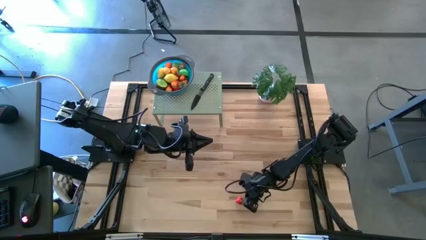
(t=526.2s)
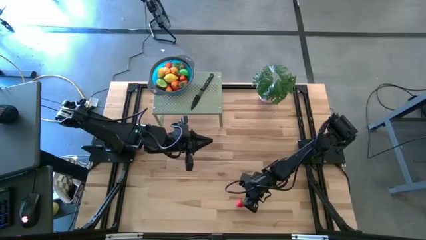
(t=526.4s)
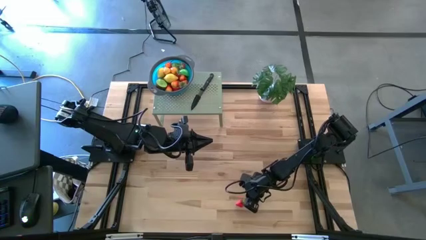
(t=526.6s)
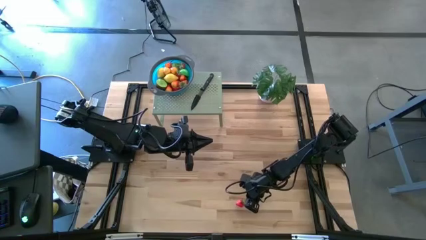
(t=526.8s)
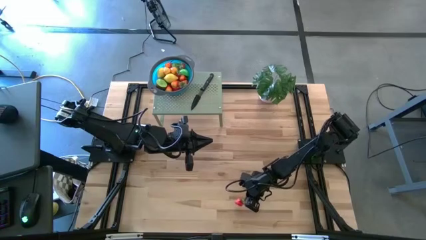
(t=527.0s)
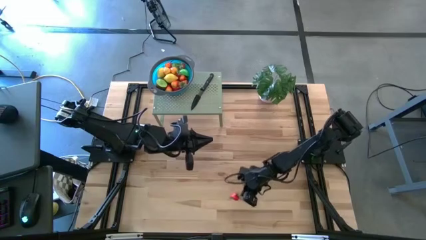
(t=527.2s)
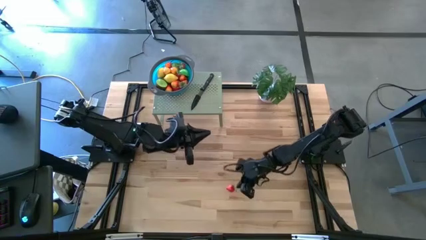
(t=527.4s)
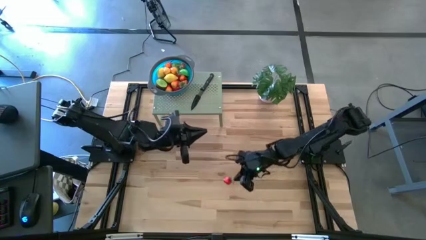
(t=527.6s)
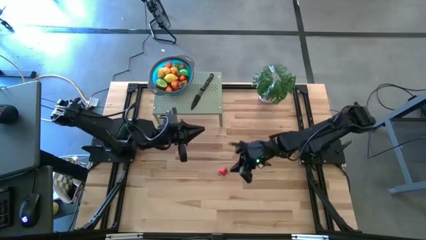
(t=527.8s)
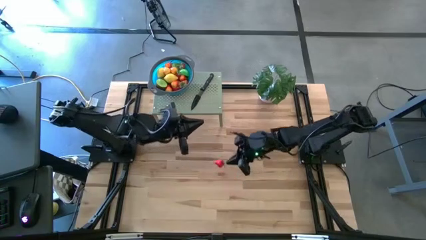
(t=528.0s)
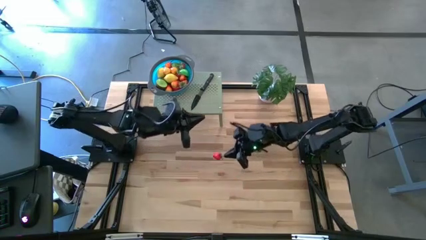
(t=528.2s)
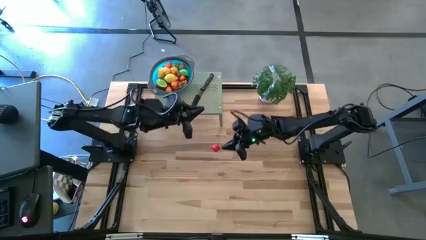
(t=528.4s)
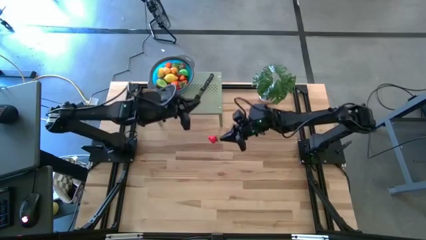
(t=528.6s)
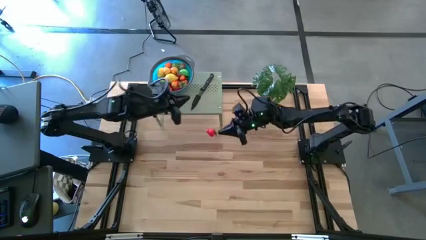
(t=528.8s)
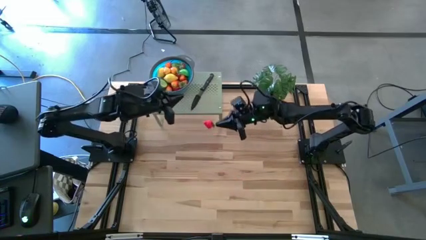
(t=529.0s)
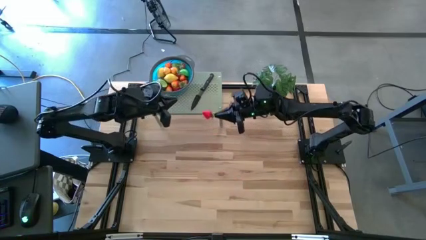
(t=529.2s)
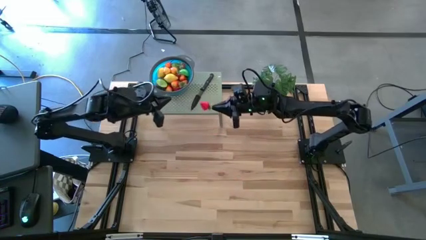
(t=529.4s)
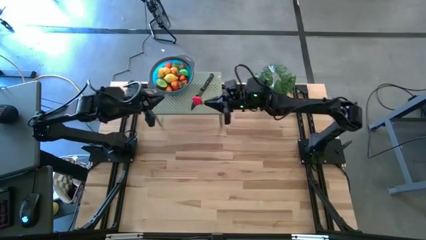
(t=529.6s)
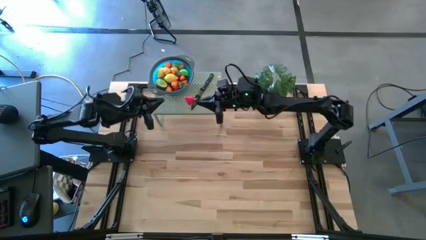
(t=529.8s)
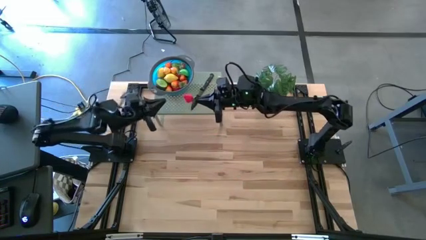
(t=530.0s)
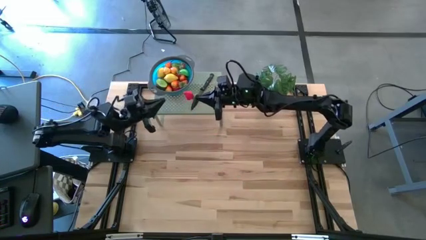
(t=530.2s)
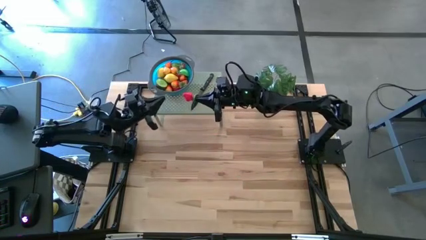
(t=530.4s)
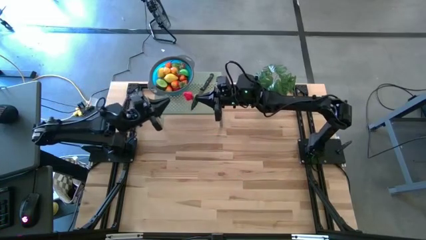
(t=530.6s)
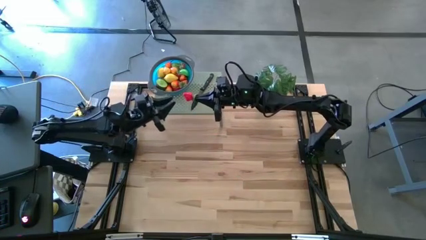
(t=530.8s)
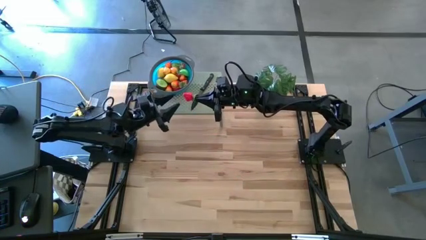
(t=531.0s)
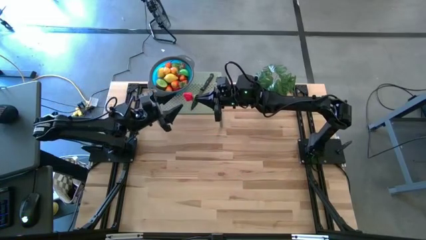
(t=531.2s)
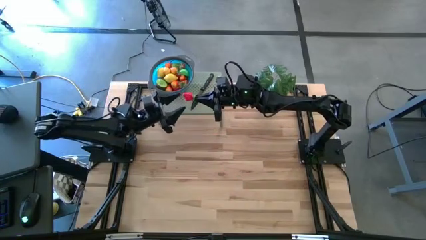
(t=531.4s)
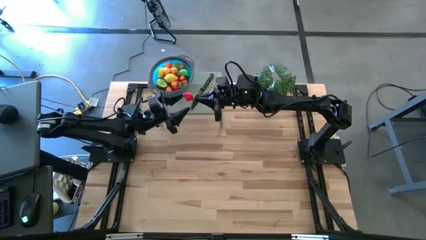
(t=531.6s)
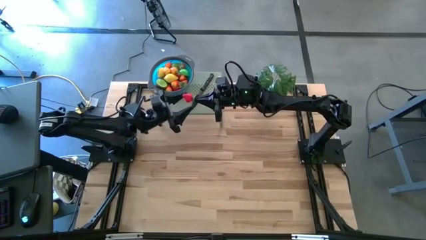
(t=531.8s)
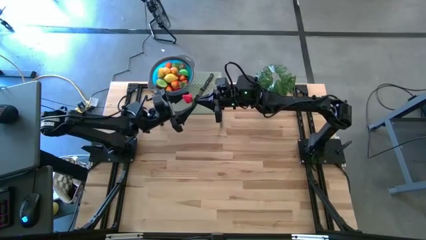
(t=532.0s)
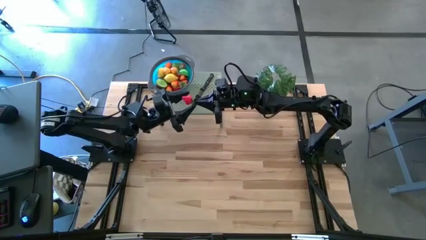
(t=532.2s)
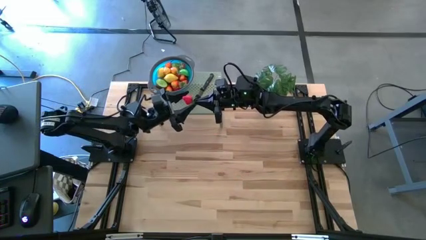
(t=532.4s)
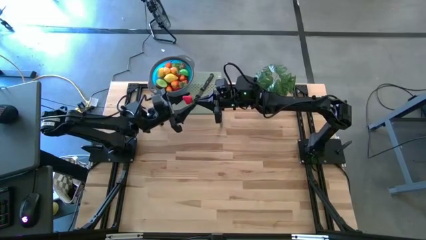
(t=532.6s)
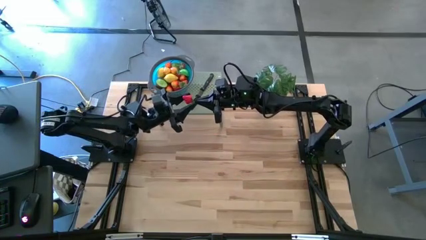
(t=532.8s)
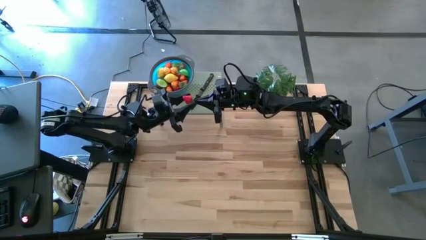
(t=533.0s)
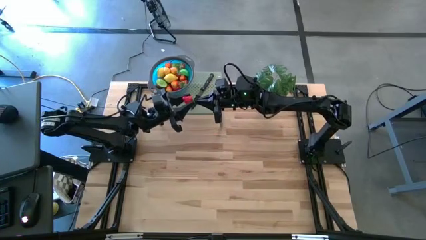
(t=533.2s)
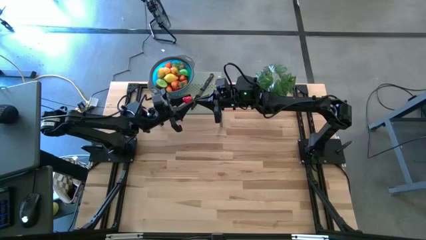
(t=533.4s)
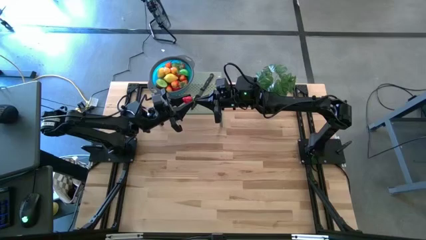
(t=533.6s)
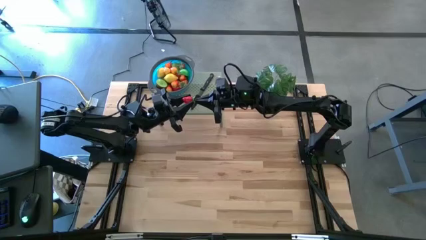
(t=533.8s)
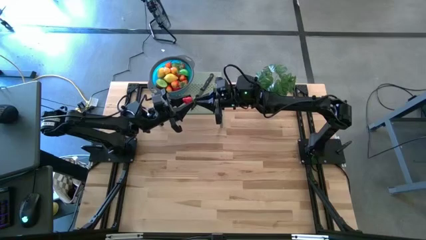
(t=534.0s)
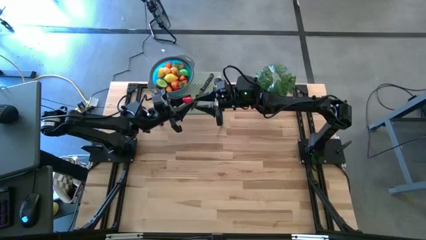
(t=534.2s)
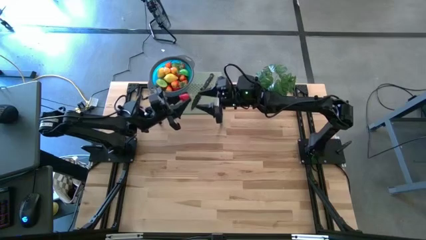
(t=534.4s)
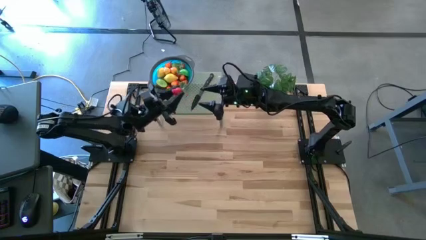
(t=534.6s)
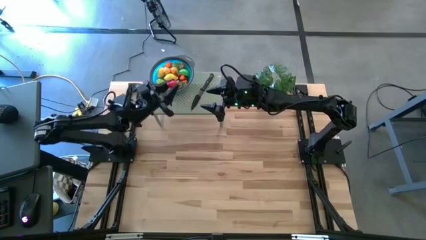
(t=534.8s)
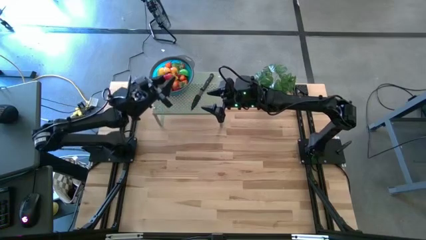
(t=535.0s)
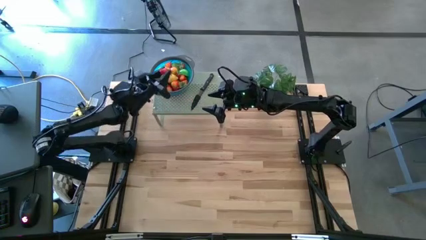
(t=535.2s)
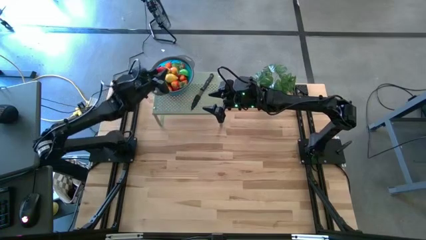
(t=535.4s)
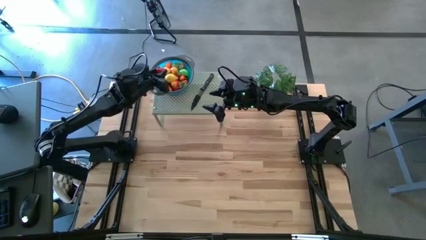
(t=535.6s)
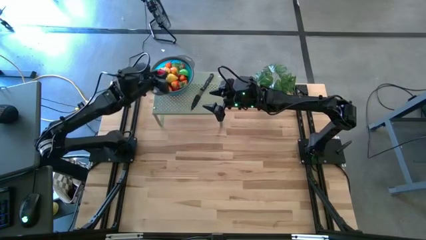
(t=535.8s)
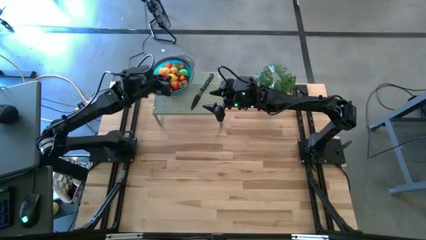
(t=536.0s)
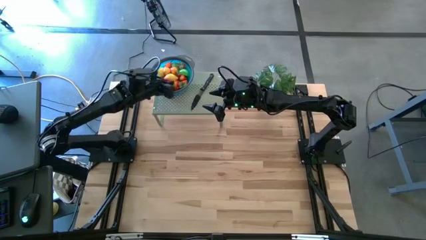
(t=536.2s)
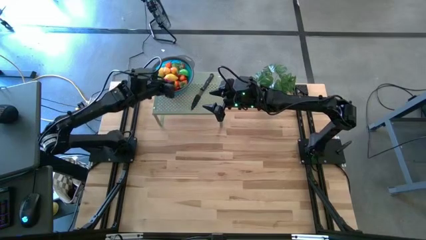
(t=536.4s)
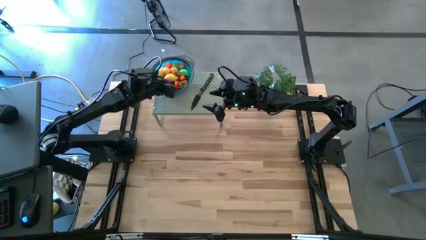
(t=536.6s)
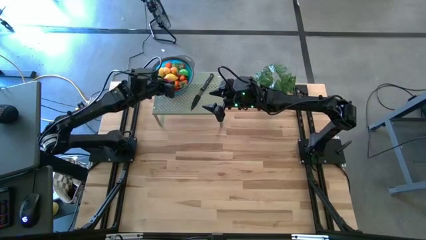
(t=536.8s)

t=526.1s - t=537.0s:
Task: Pick & Place Fruit
Put the strawberry into the strainer bowl on the shelf

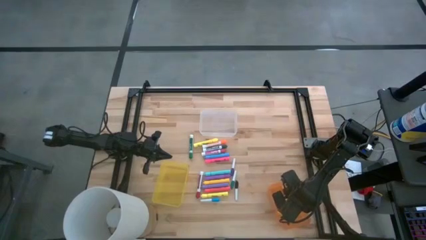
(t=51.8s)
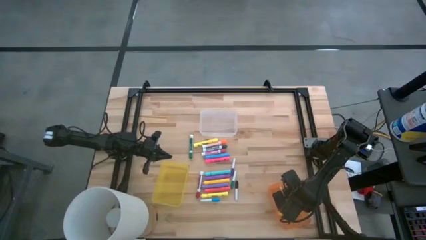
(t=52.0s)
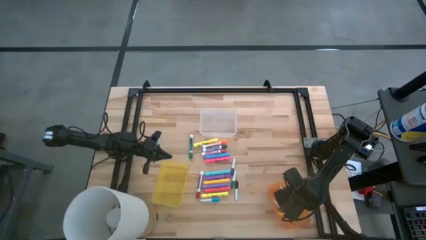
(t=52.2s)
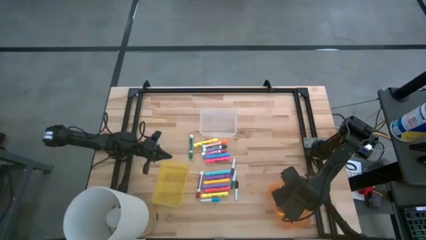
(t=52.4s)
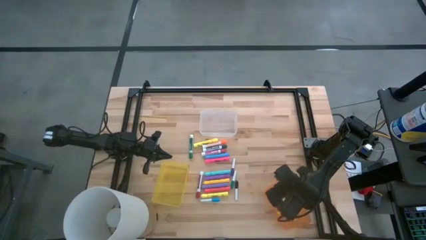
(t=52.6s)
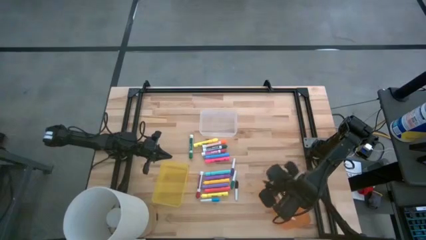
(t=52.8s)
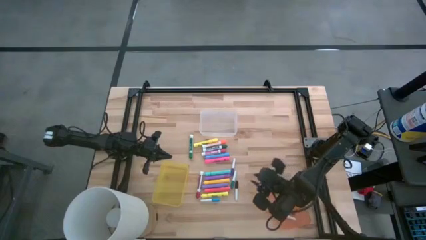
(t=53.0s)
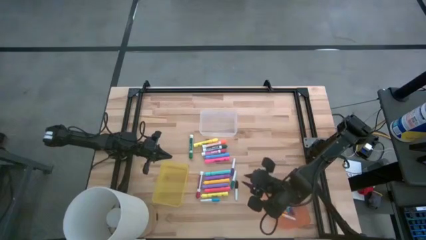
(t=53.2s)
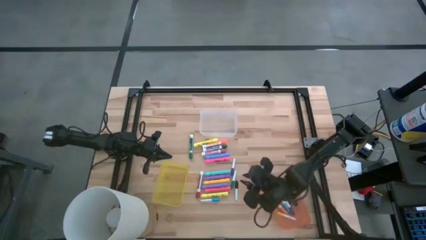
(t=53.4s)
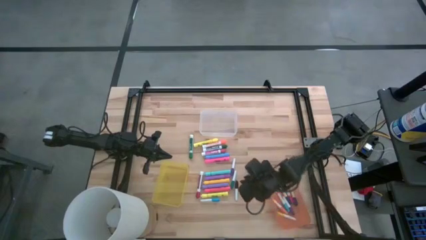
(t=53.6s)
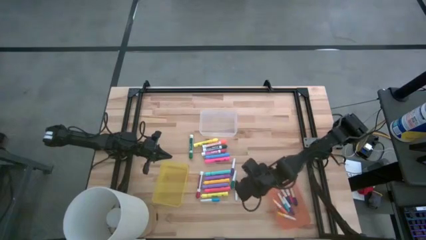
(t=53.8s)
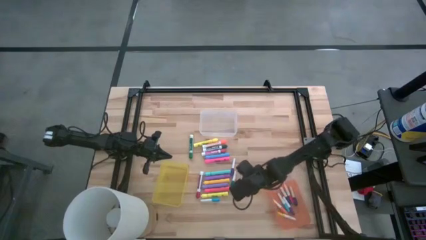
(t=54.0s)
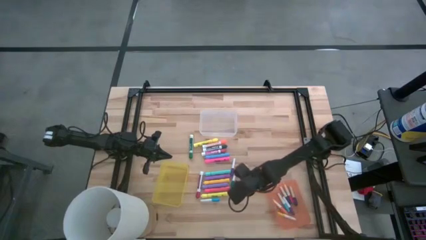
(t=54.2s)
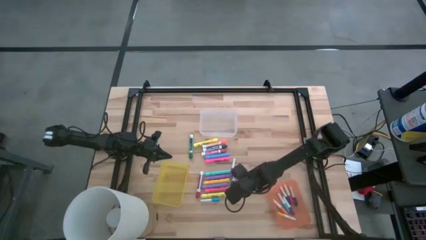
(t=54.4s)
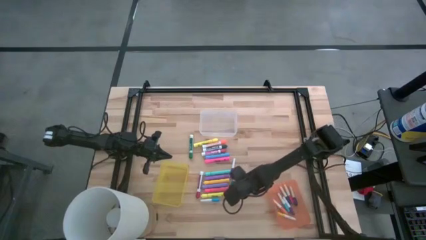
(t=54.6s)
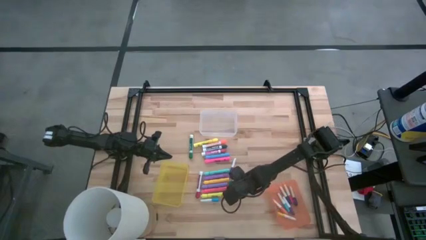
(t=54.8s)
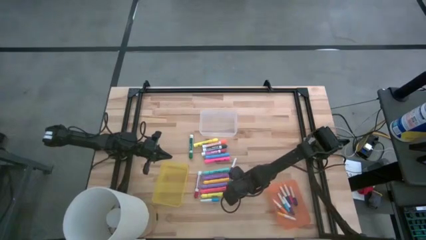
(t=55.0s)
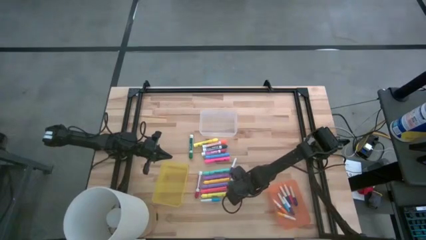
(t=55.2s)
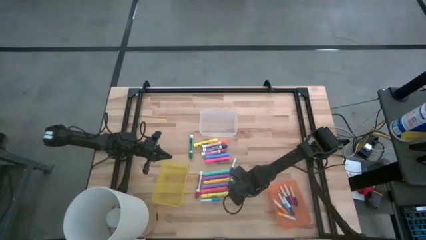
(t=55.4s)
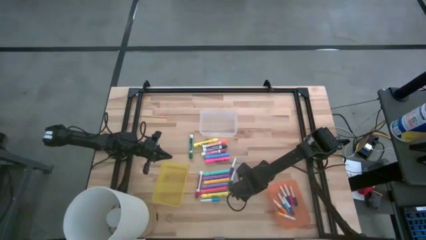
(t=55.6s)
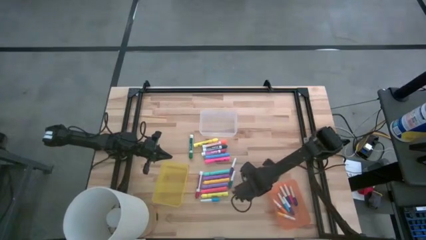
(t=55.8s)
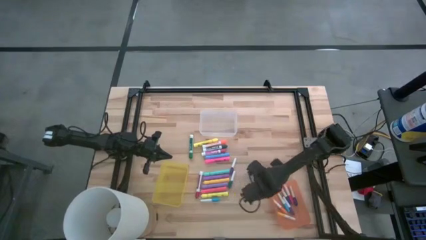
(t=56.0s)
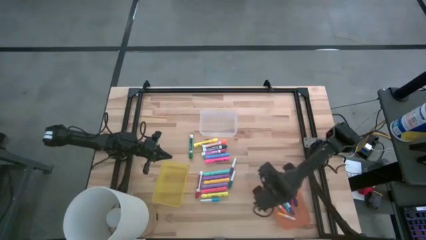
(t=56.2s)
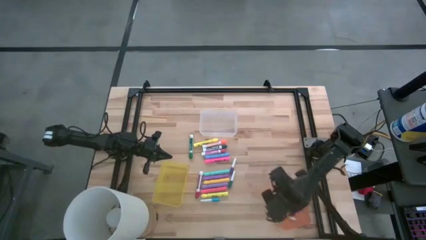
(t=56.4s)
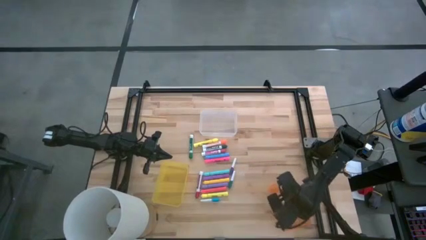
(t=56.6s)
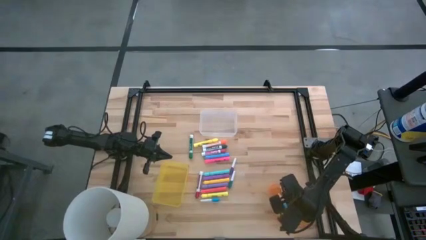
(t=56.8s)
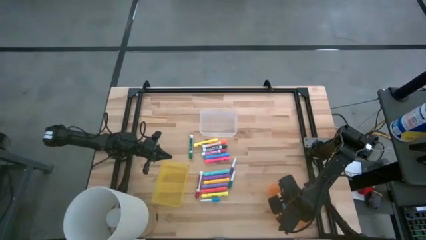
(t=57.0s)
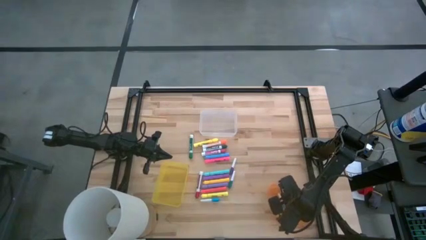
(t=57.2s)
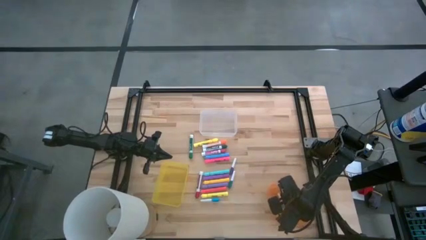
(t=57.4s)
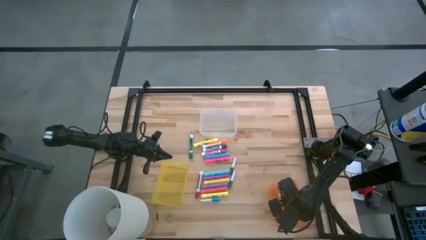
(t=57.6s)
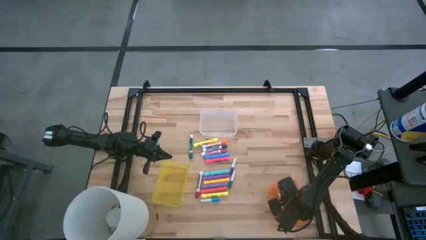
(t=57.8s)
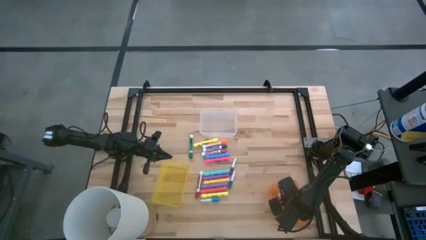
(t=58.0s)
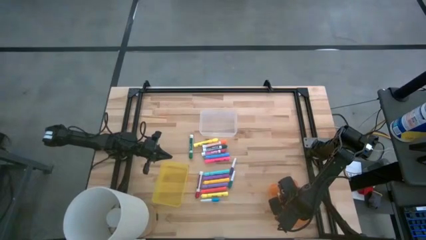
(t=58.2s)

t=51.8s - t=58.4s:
Task: Pick & Place Markers
Put the small black highlighter pen into the orange bin
